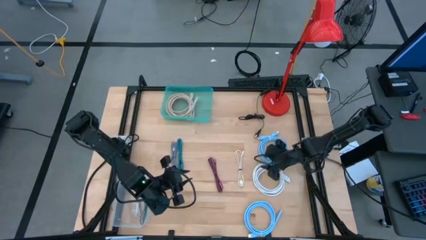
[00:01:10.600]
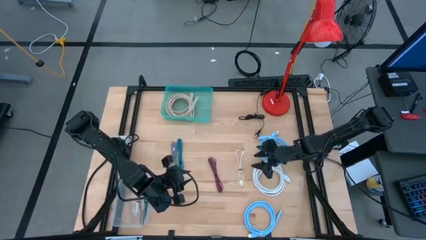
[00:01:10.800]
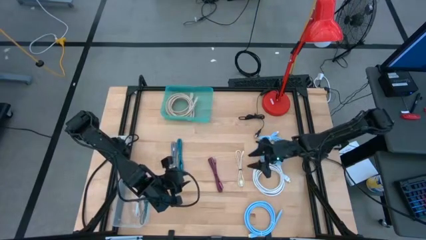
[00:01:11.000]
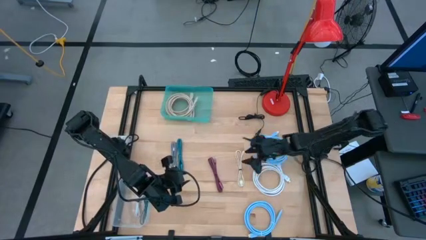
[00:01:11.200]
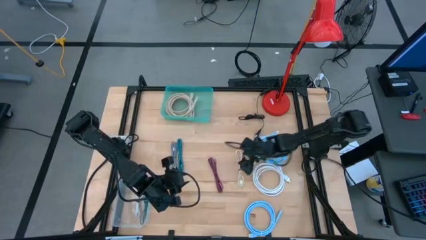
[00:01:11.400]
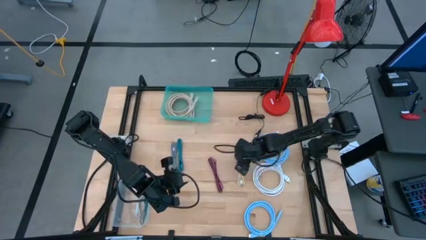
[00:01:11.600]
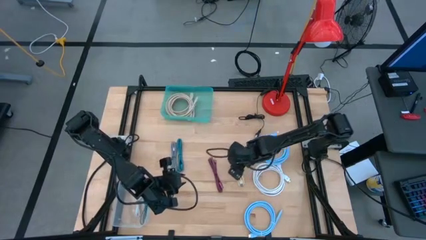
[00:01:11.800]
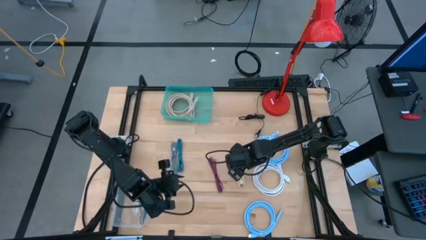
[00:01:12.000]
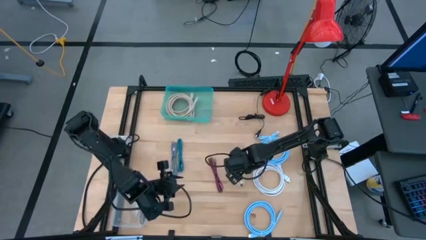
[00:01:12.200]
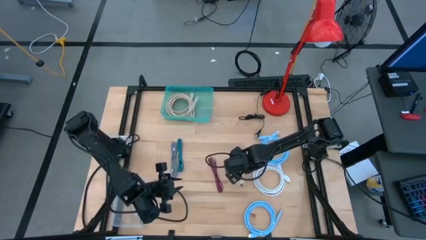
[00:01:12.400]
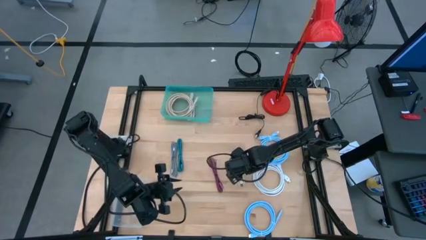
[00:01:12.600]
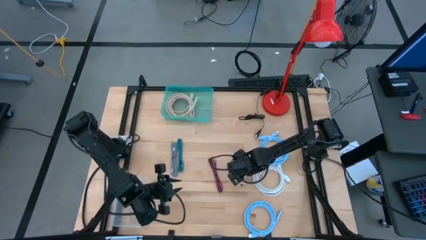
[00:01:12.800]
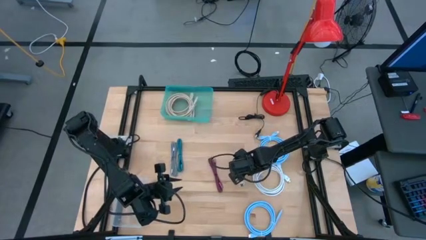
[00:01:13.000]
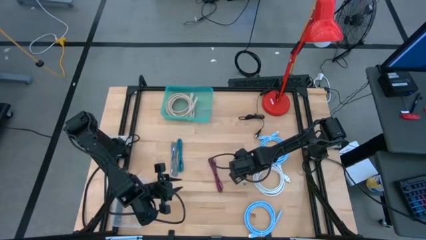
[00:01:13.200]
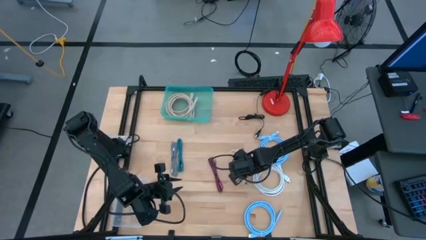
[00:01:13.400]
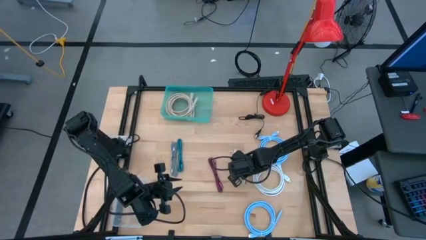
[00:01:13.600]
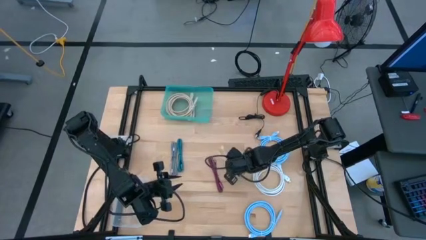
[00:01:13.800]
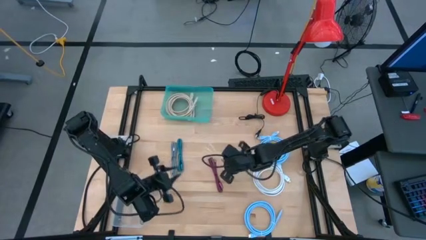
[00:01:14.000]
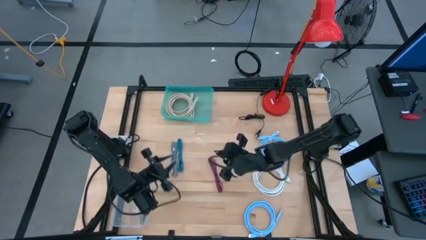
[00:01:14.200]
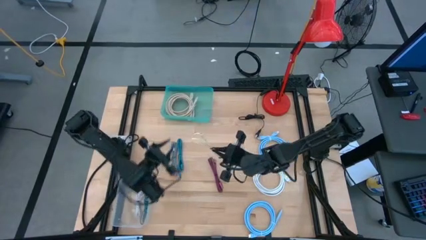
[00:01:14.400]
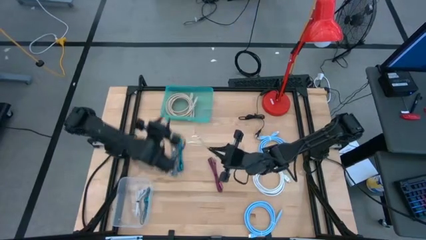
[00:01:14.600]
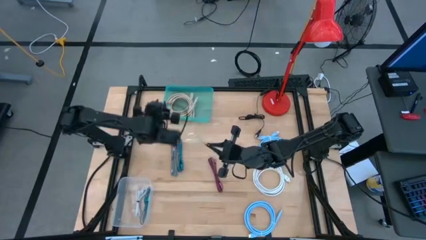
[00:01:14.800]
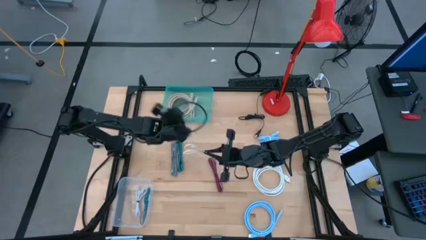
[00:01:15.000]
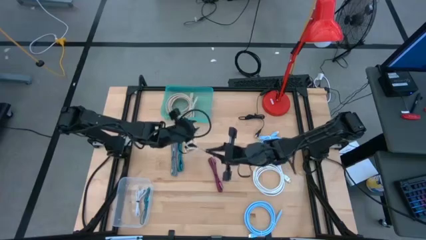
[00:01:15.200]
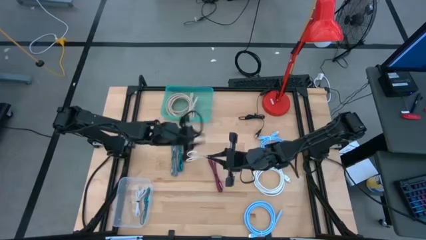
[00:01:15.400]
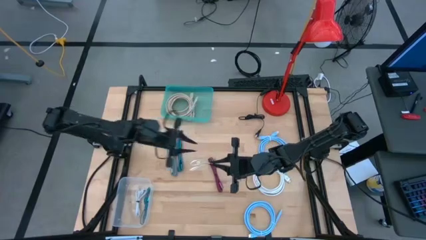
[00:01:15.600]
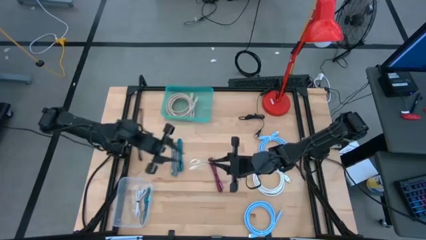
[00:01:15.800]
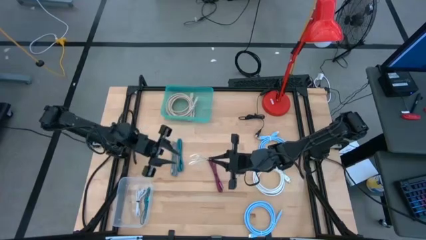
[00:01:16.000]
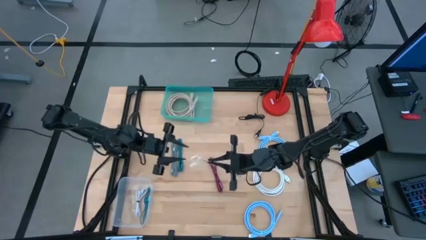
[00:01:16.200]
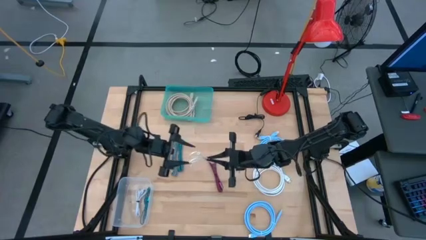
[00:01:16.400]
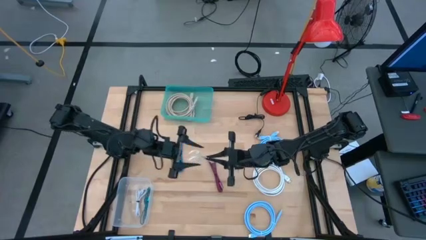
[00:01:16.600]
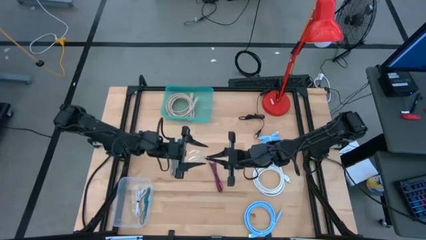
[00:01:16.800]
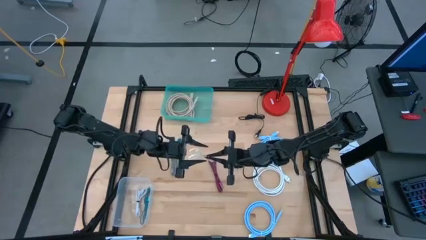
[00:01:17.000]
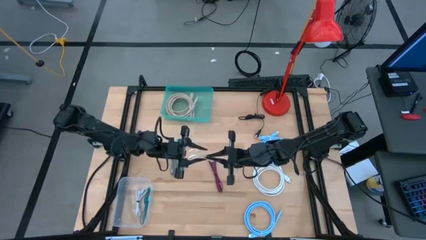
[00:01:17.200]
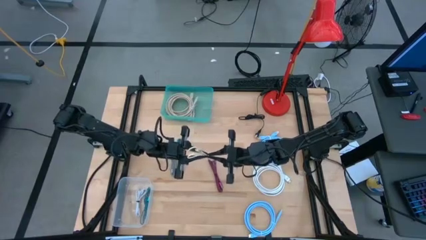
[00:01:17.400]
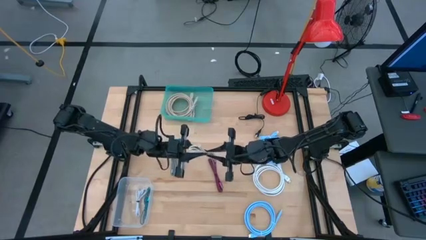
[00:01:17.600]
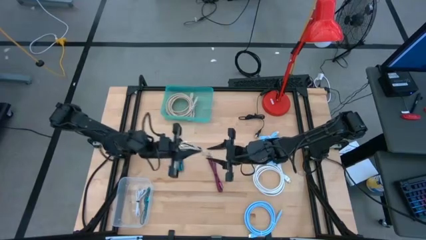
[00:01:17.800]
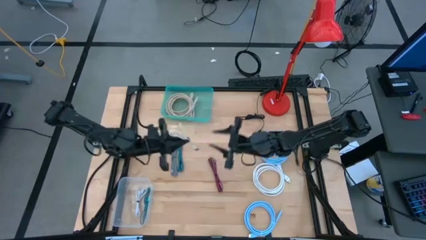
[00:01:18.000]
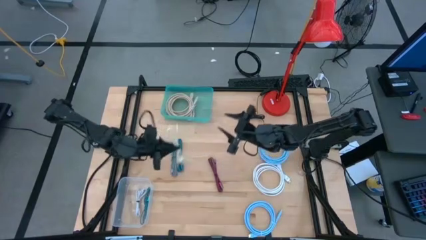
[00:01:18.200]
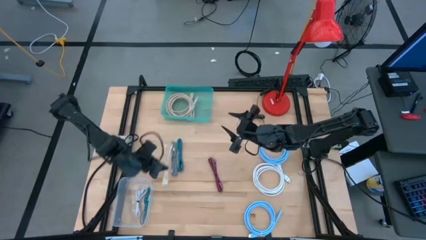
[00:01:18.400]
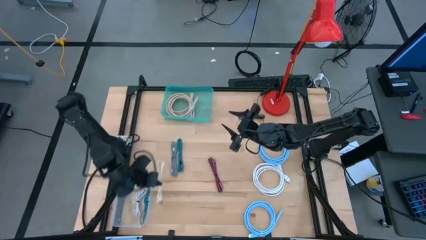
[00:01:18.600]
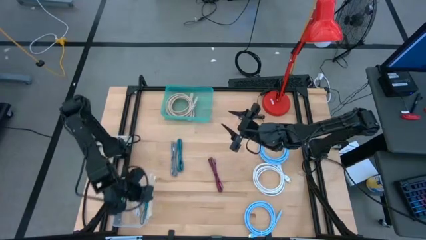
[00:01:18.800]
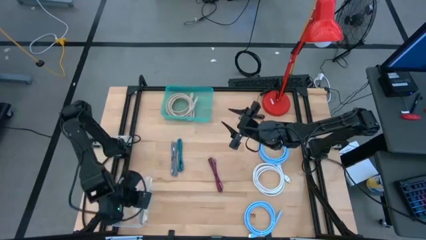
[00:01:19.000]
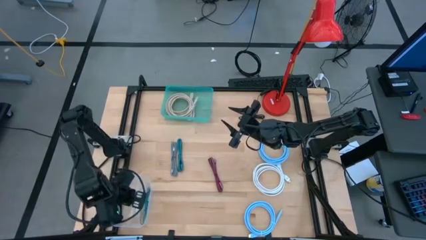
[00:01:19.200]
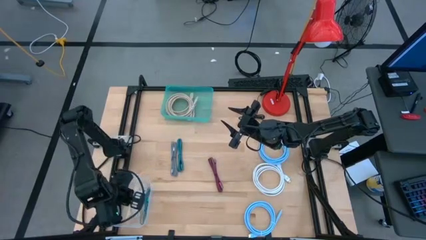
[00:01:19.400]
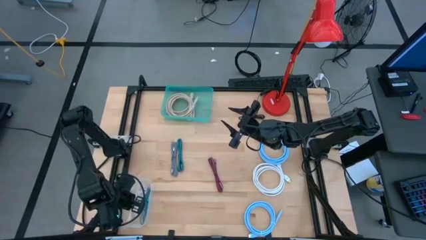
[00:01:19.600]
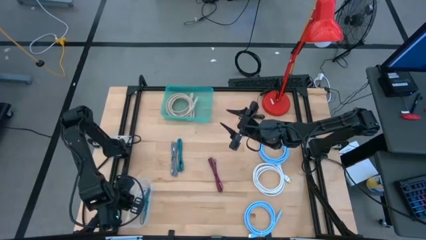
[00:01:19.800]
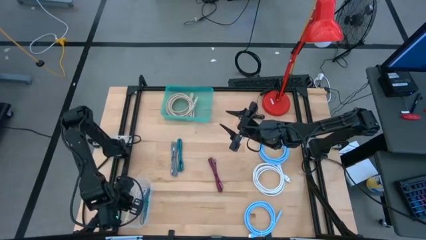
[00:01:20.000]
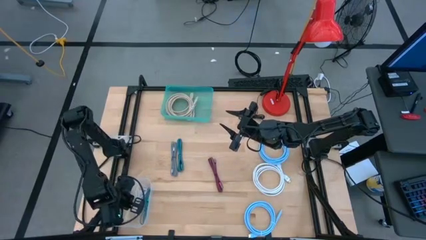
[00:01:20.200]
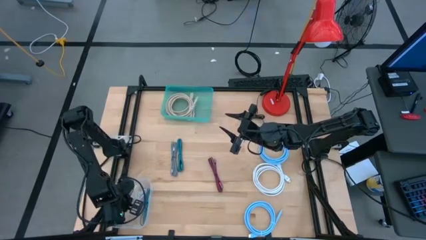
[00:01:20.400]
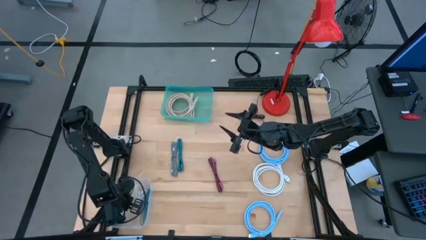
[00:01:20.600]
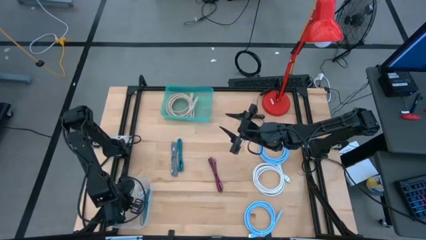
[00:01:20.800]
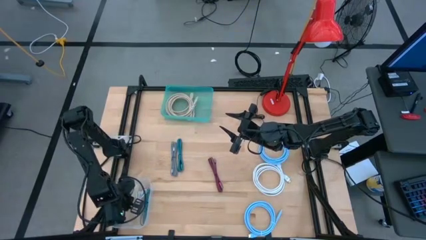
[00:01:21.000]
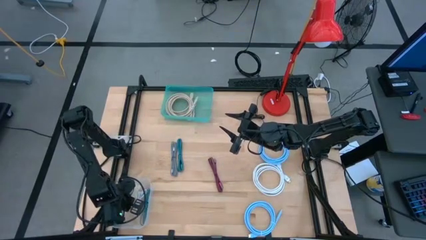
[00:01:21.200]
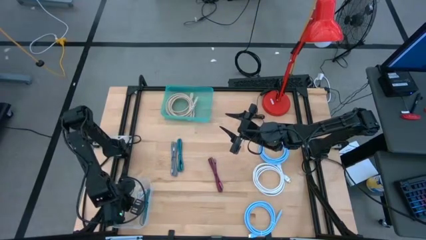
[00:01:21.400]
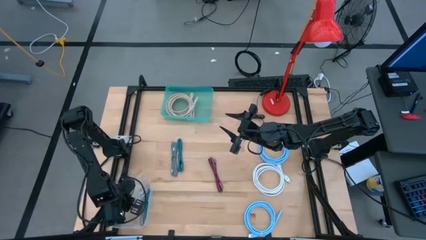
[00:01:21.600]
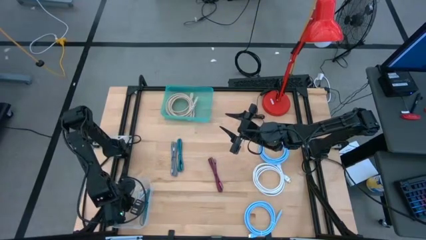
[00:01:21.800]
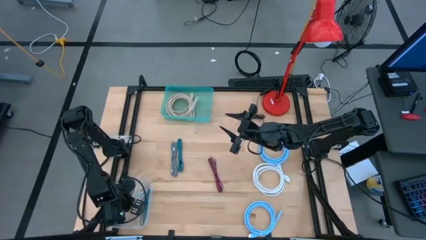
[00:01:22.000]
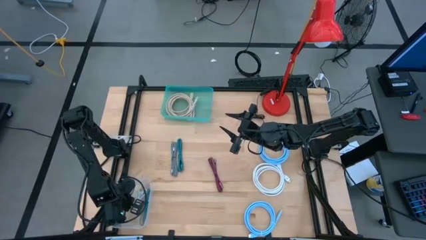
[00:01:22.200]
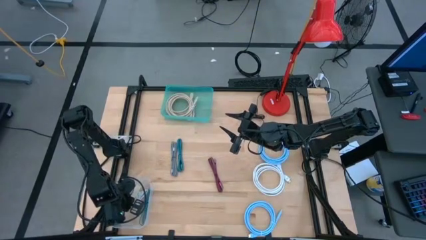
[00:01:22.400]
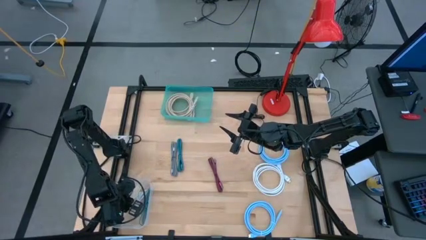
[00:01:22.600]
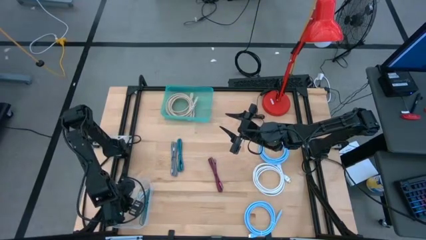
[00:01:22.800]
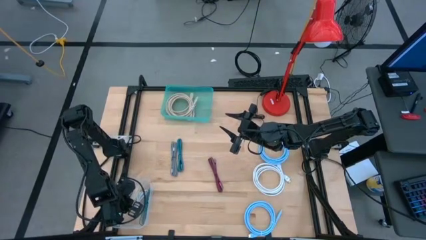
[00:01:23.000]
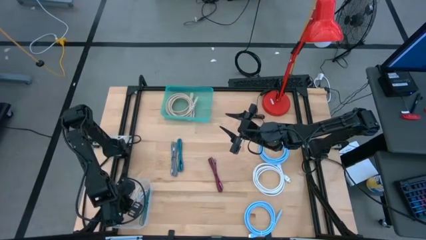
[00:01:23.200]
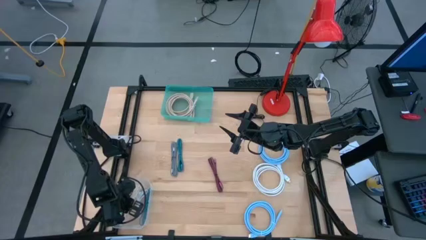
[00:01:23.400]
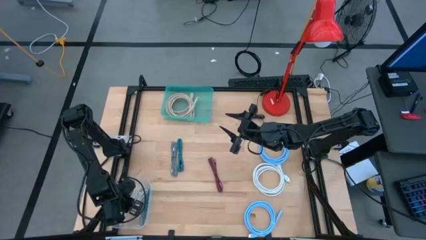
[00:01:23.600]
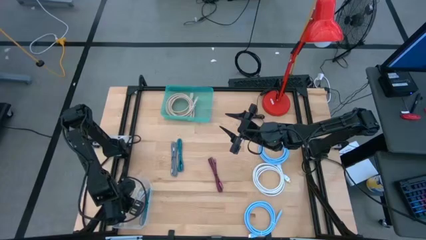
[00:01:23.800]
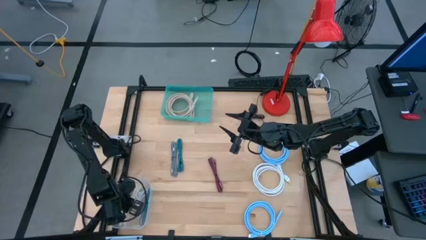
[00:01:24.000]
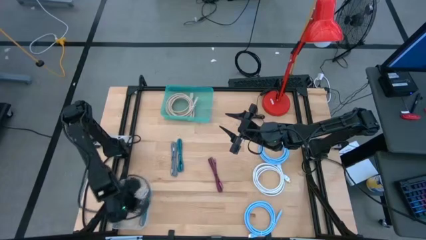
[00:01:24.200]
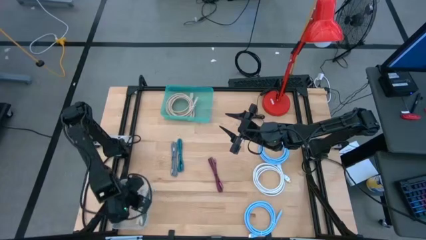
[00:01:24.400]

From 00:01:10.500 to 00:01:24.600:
Task: Pick & Place USB Port
Put the brown charger cable into the transparent bin

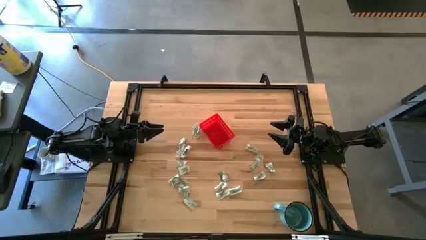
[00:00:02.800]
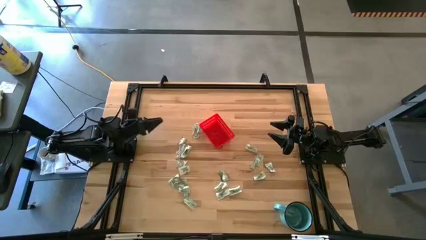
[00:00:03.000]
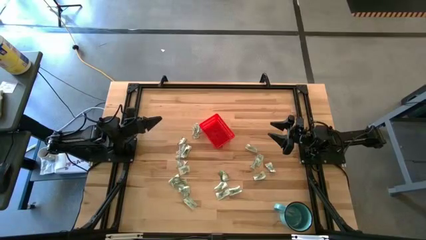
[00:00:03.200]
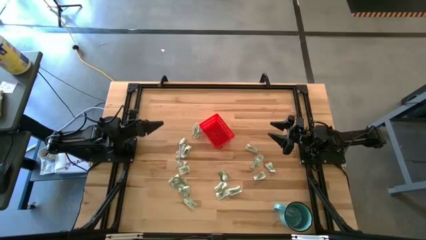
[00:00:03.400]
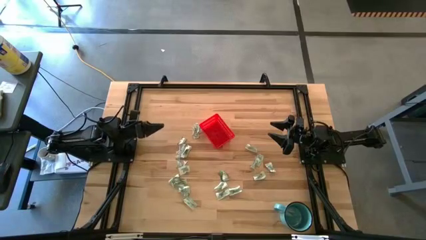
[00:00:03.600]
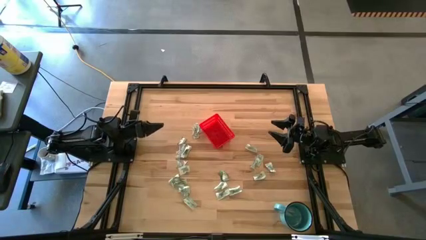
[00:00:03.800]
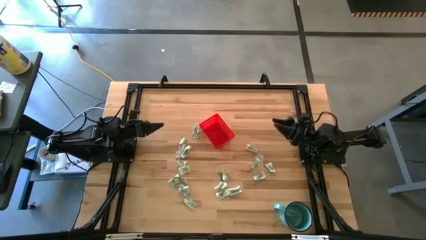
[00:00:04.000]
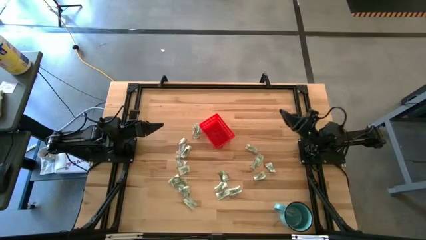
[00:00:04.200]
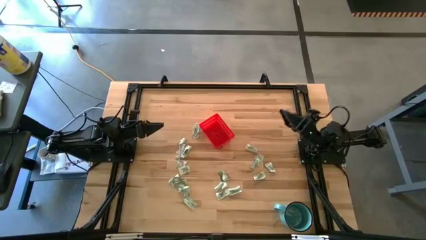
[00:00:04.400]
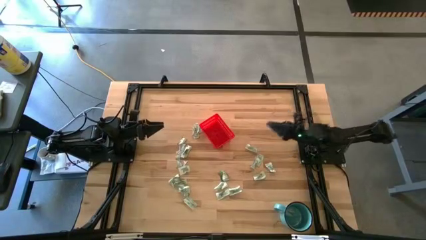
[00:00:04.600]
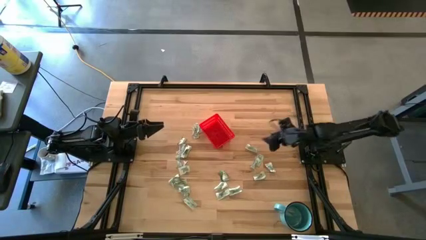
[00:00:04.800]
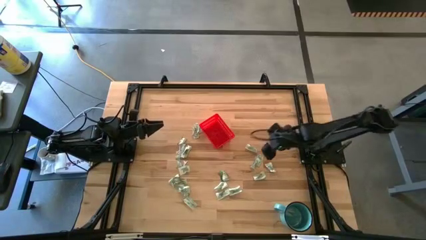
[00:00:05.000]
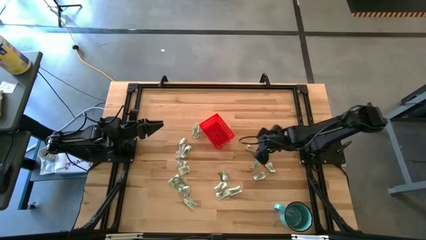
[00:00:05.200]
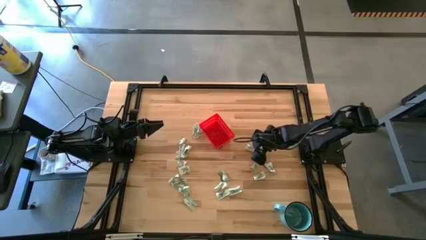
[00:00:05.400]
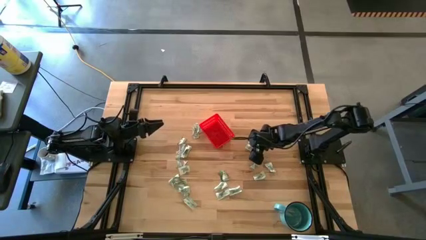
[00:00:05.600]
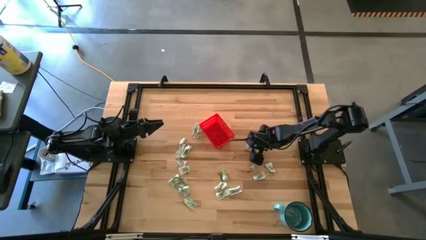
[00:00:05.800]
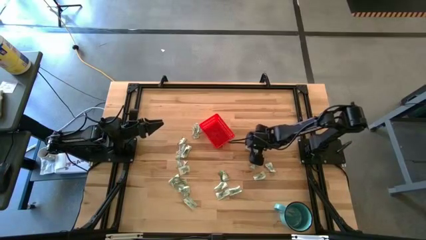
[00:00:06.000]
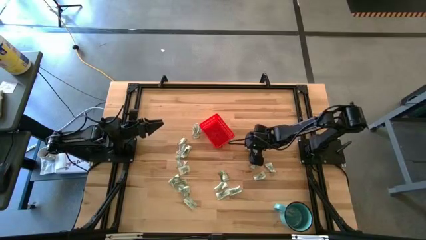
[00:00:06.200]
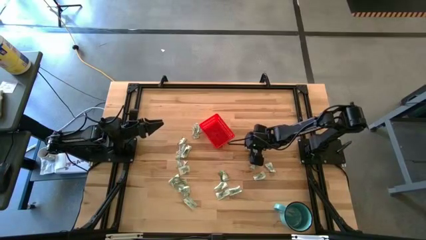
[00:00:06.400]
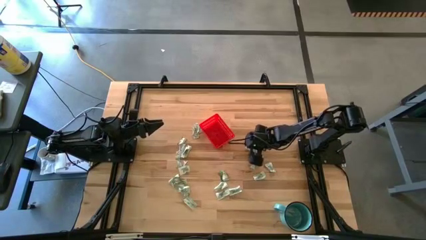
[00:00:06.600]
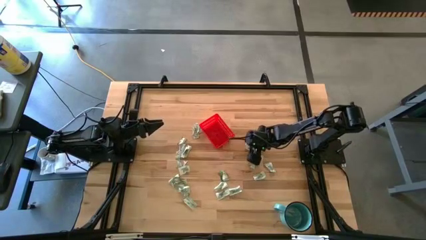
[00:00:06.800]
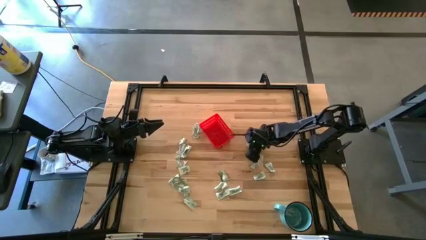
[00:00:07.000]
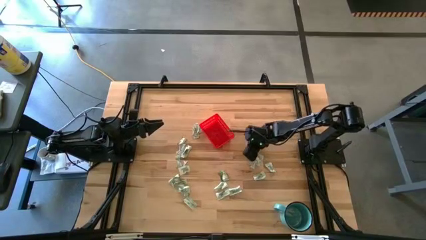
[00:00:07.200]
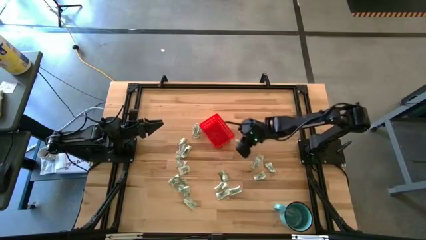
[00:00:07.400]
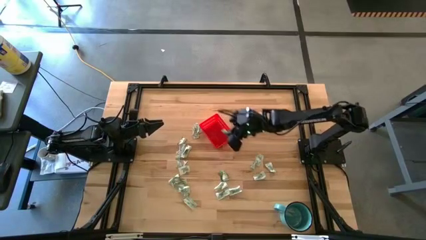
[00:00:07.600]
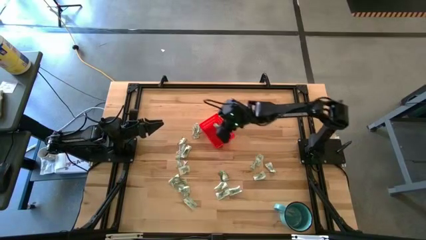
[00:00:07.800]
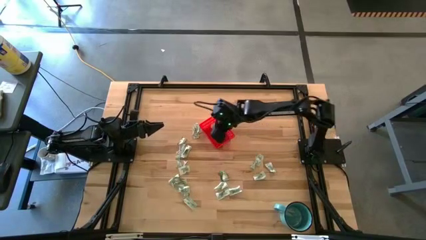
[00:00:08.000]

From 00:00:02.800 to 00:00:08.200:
Task: Pick and place Stevia / Truvia into bins
Put the stevia packet into the red basket
